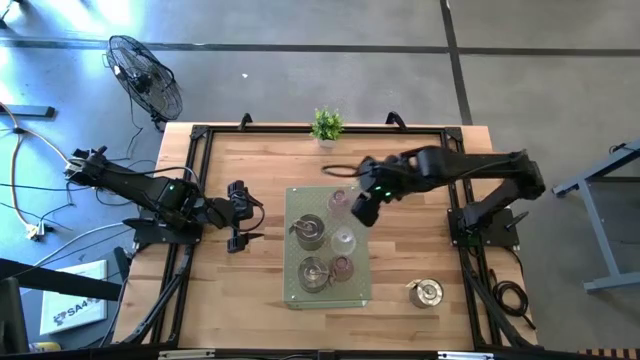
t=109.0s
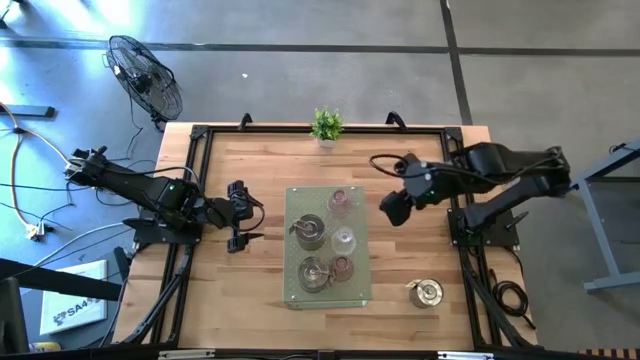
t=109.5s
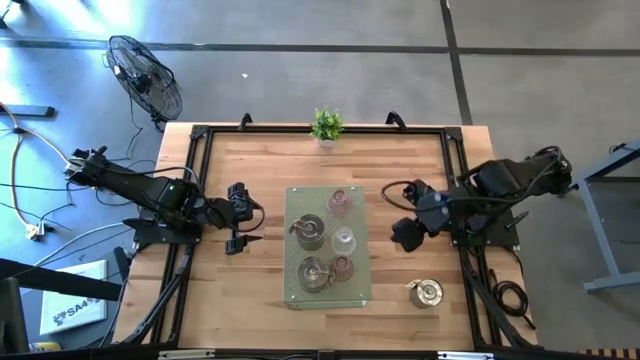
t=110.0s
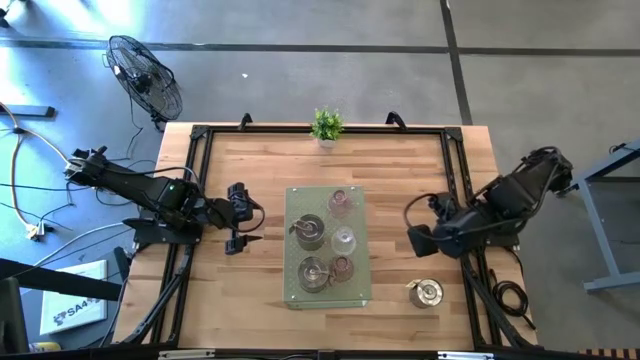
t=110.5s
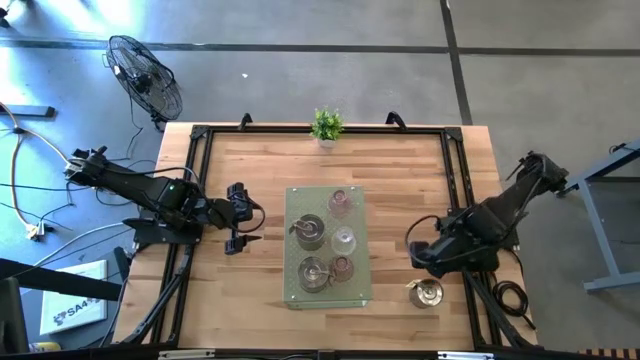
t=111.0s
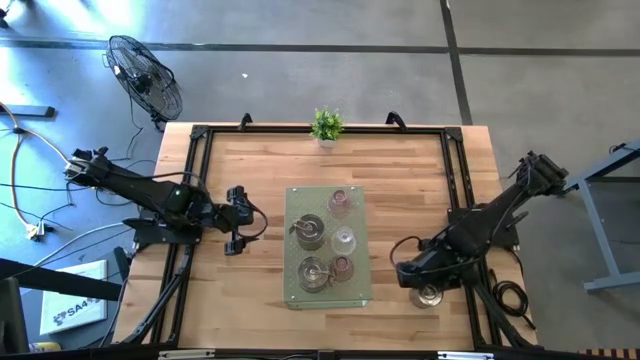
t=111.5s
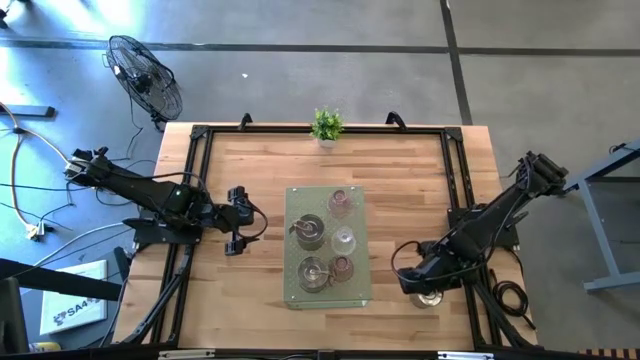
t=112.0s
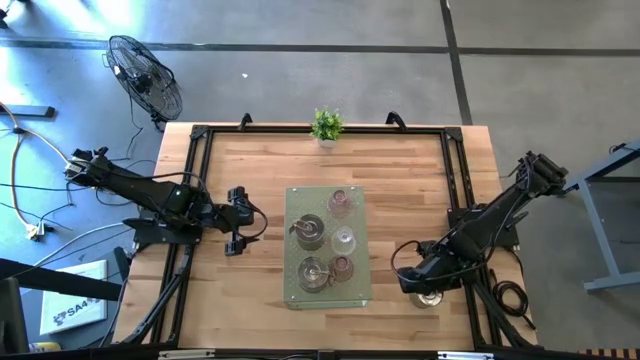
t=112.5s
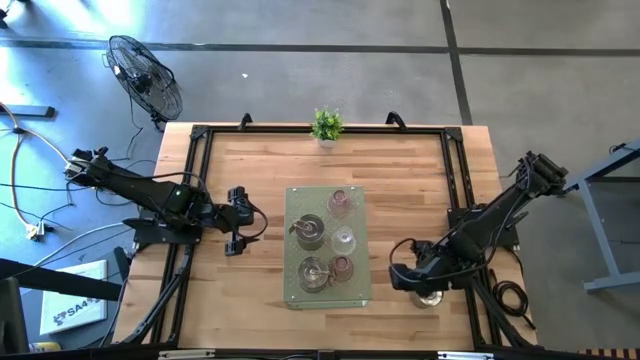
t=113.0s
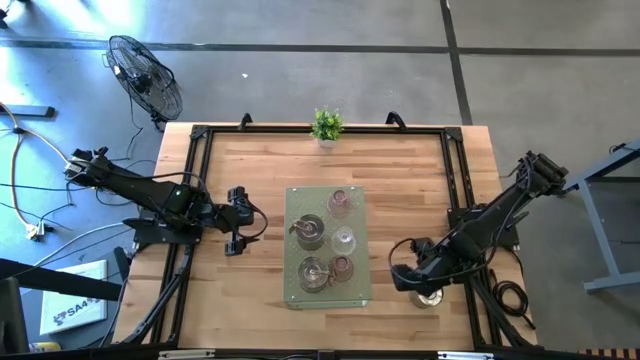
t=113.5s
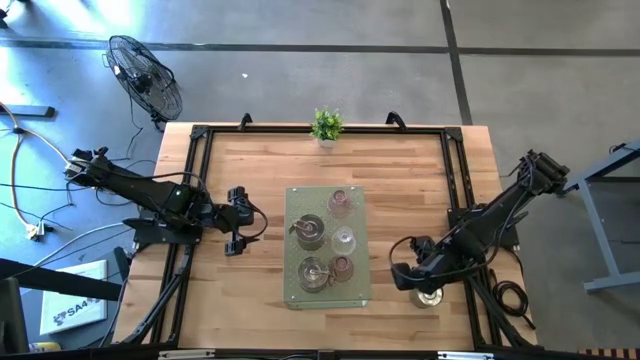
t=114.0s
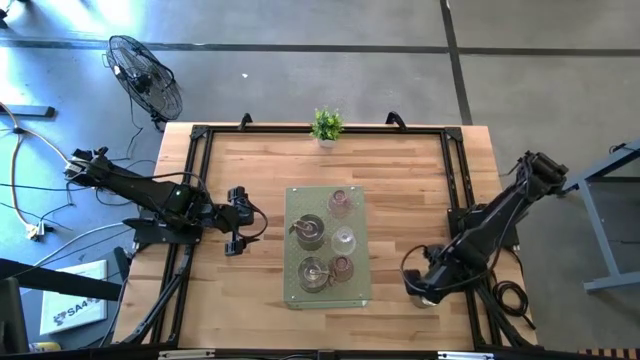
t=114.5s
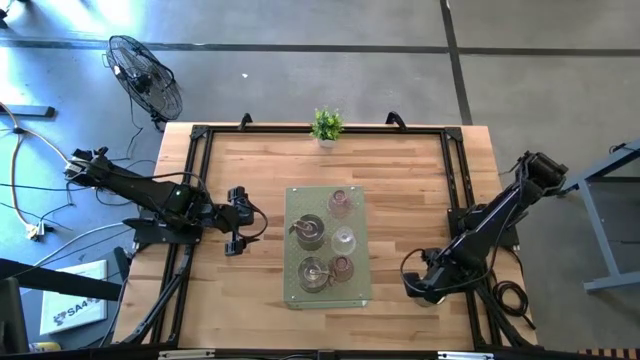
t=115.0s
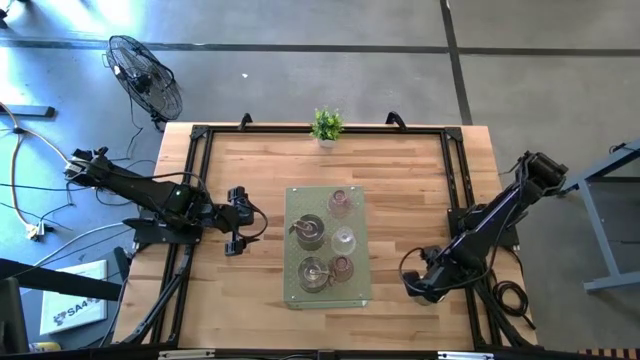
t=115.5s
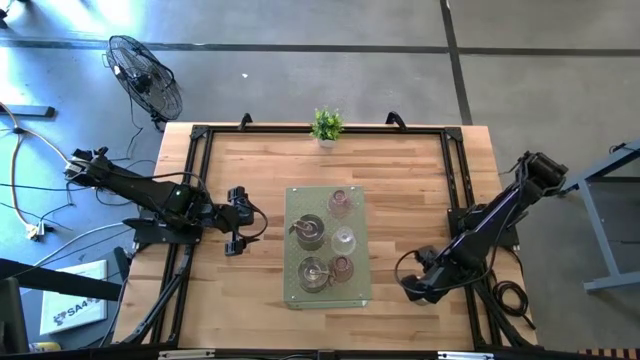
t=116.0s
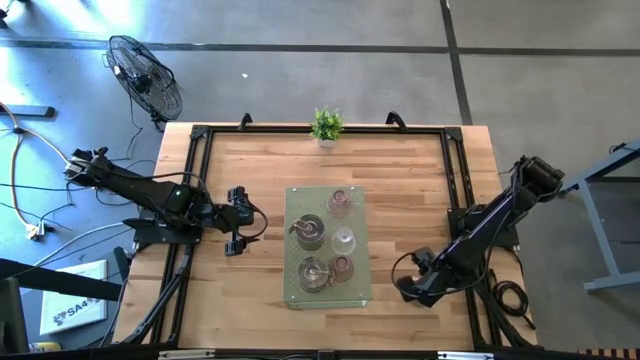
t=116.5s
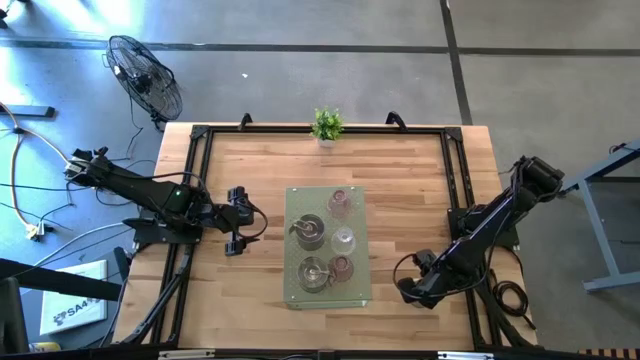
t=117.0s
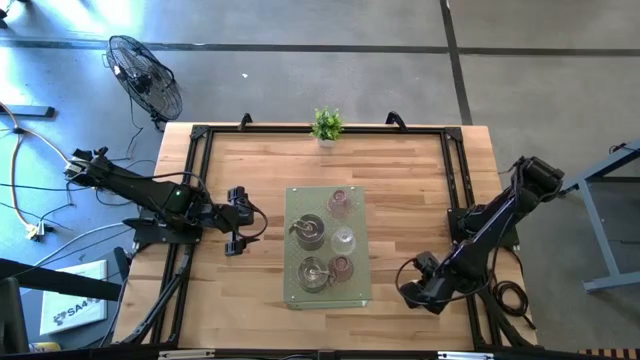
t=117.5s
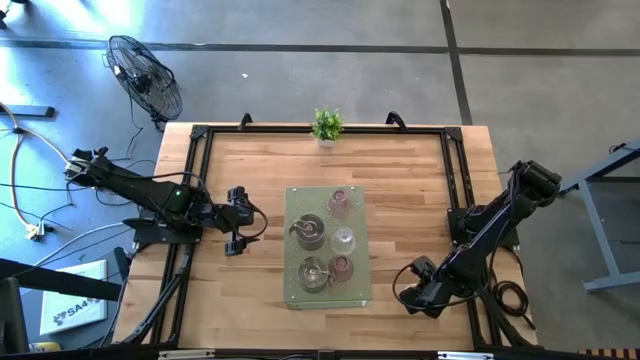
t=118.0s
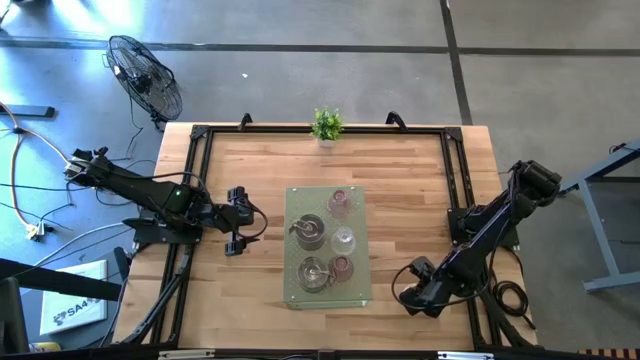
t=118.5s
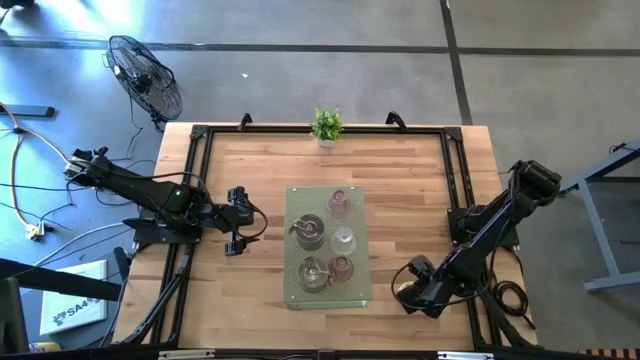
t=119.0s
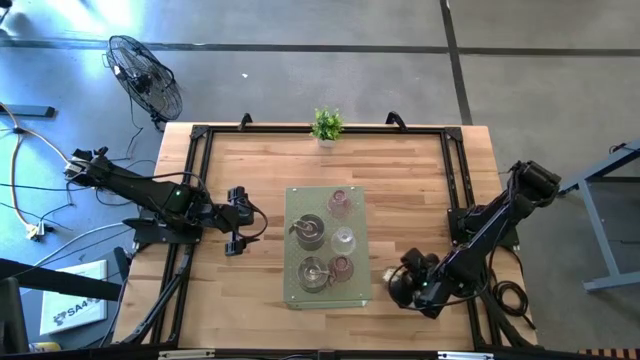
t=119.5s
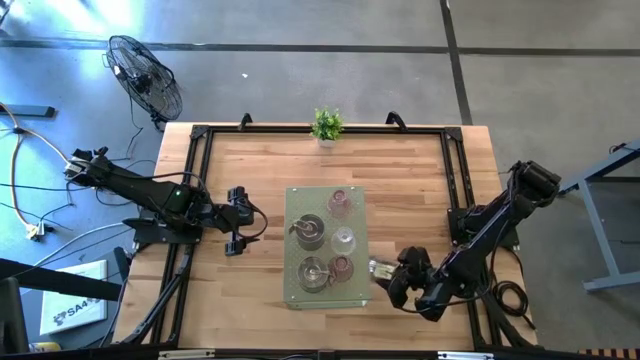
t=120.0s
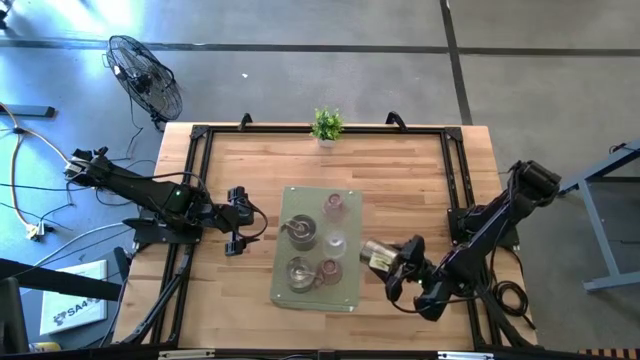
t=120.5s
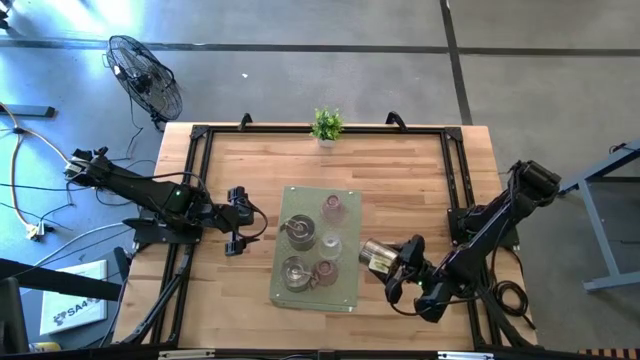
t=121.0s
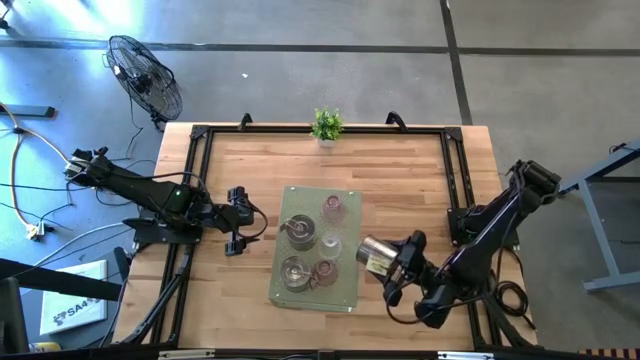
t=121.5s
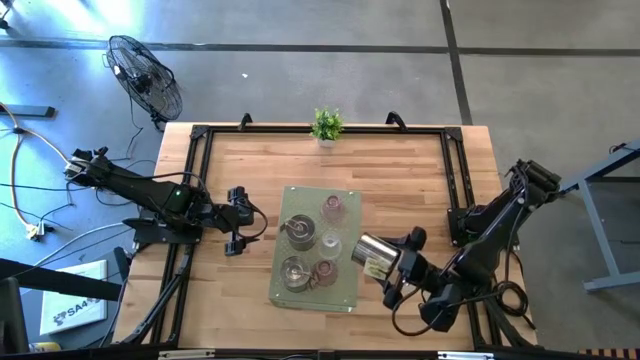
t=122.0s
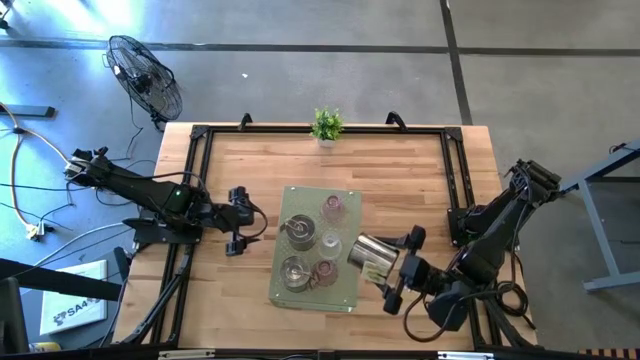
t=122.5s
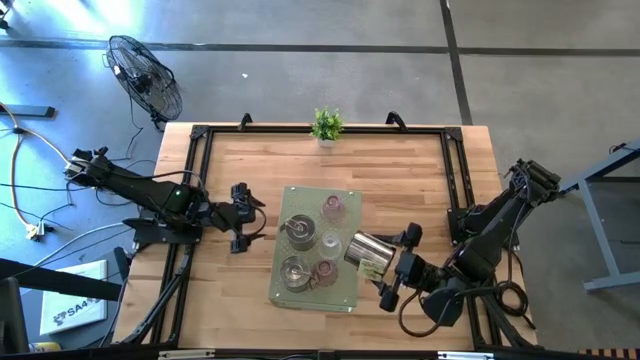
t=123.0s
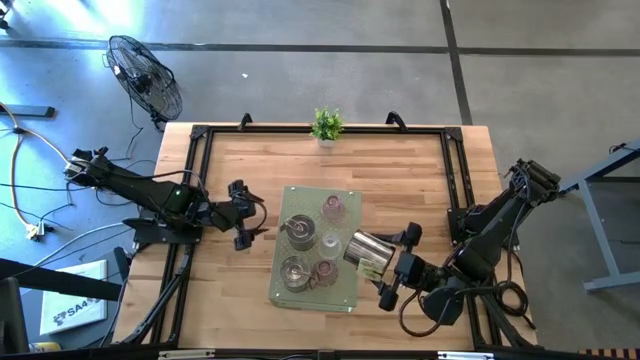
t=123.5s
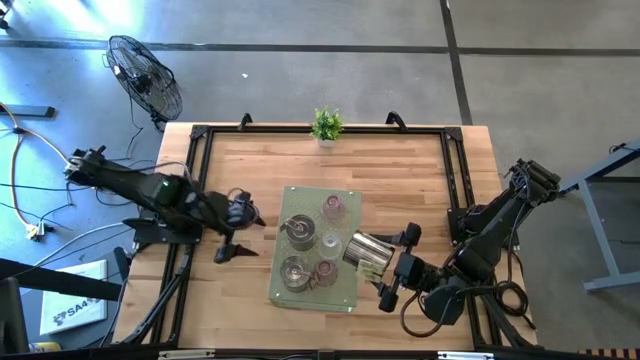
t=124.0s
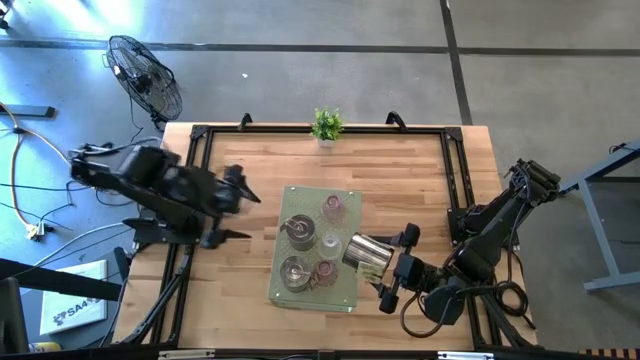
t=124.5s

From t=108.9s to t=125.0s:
Task: Pick & Place candle stick holders
Put the green scented candle on the shelf aligned with the purple candle holder

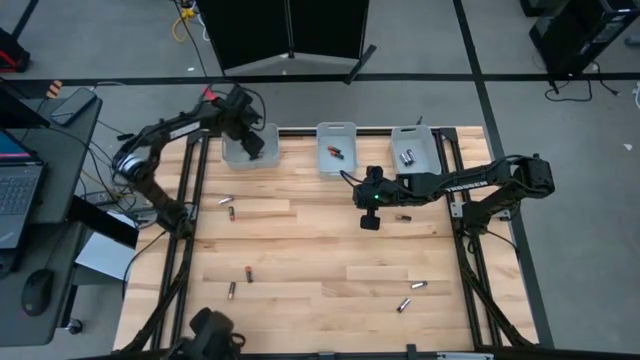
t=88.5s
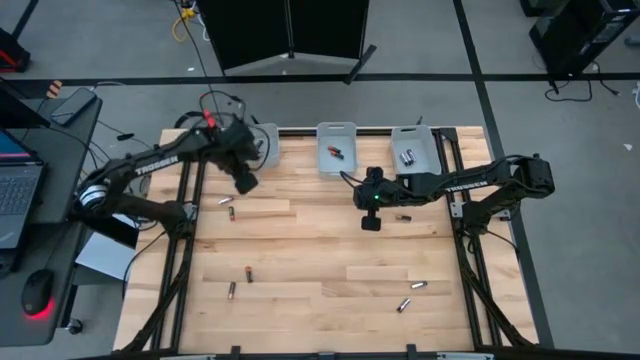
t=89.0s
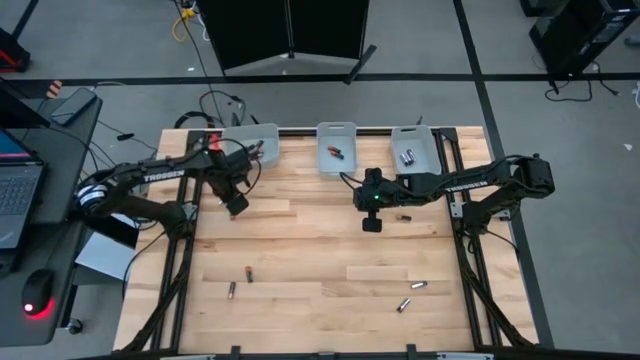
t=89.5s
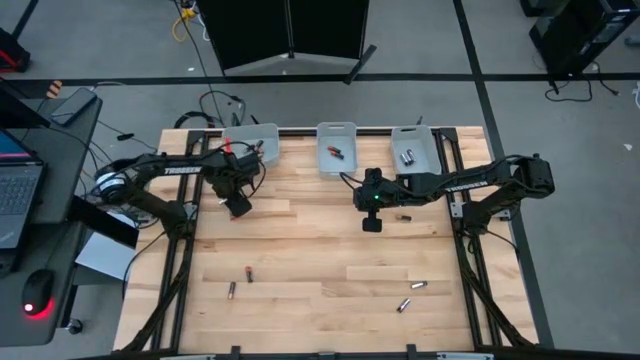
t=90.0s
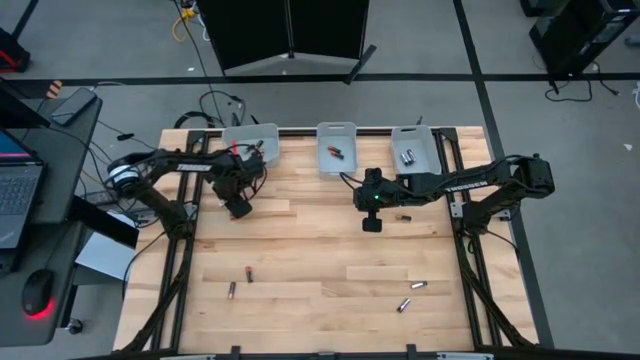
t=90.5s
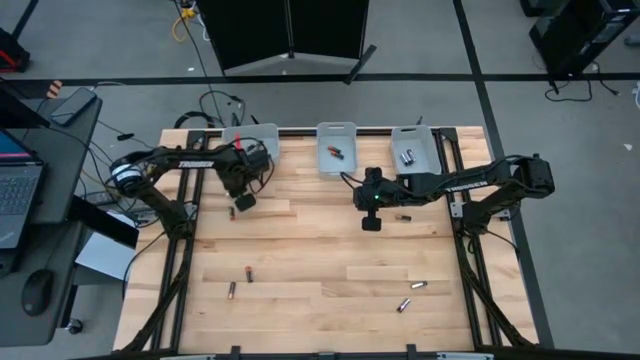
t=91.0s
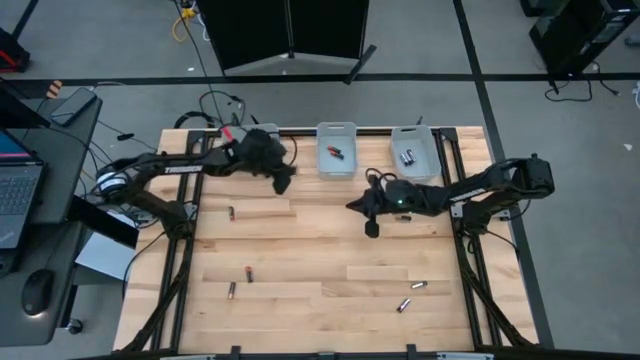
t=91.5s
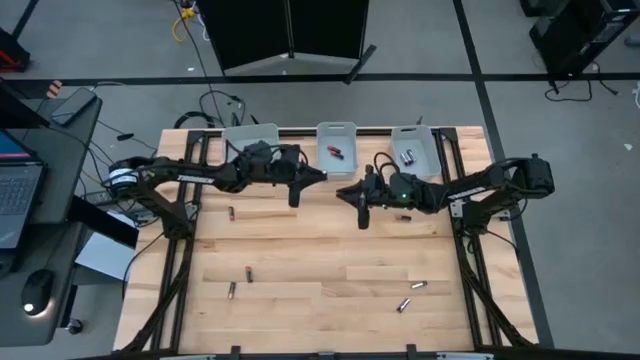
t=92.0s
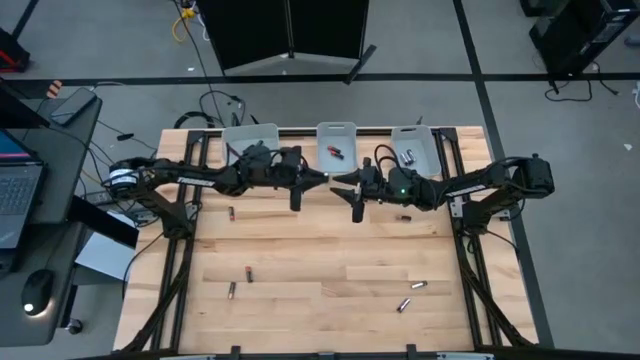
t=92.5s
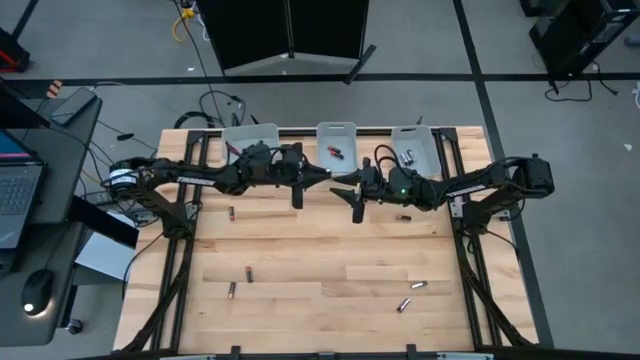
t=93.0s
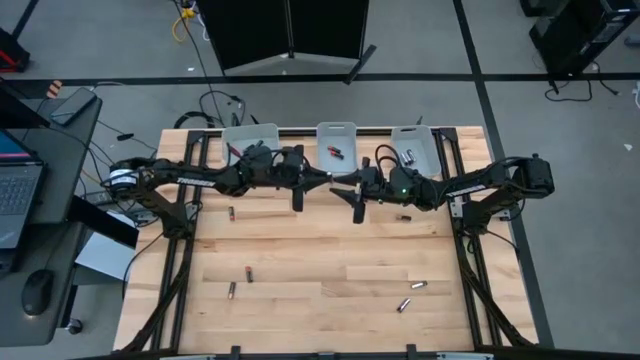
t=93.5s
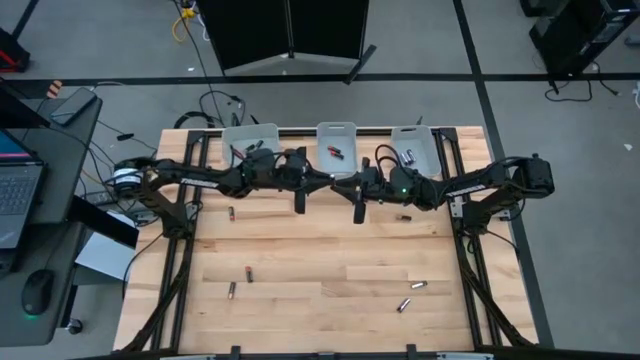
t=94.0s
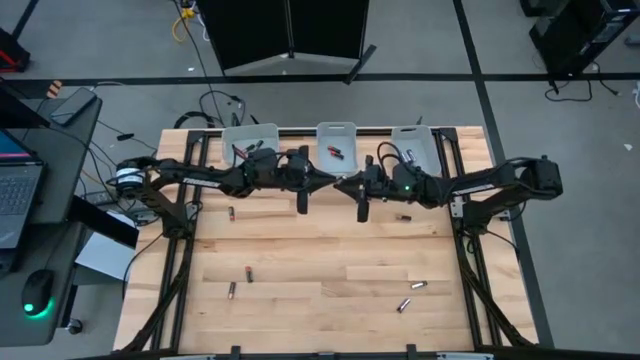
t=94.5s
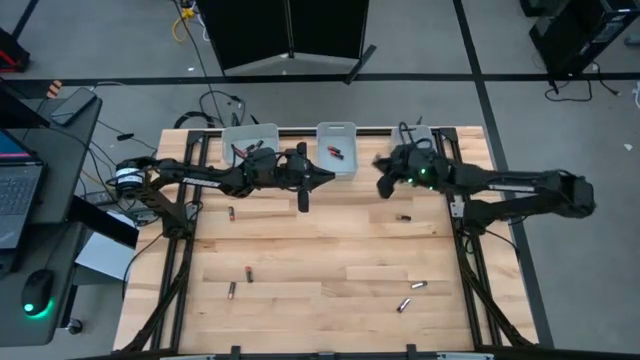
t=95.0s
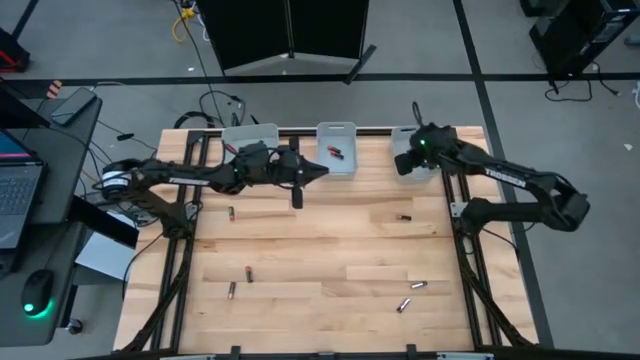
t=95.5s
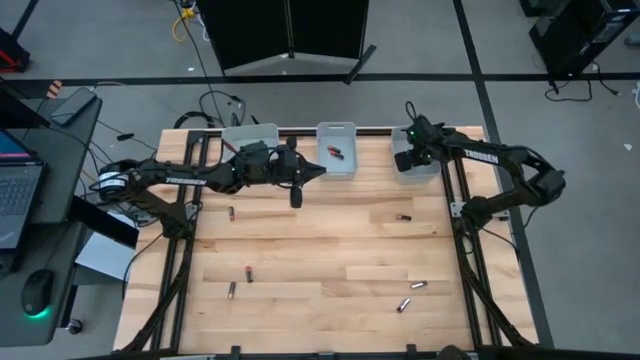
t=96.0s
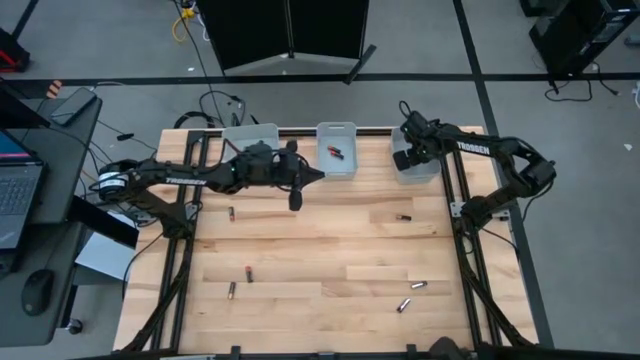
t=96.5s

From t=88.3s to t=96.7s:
Task: Sort batteries
Put the top black silver battery into the right bin
